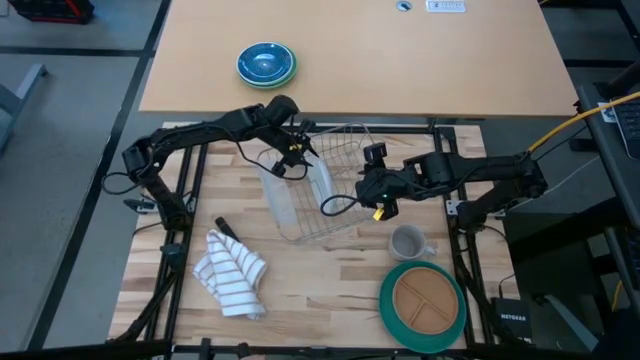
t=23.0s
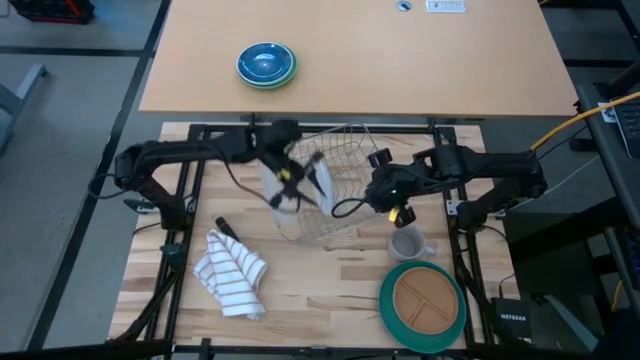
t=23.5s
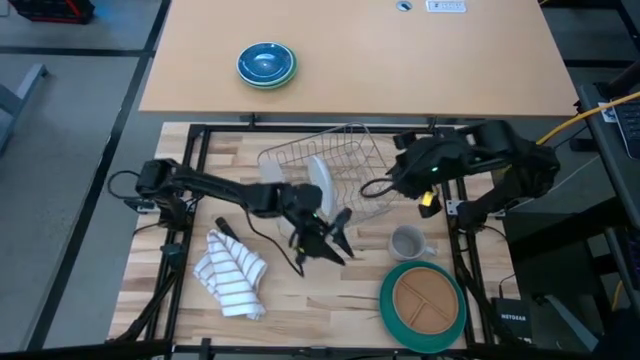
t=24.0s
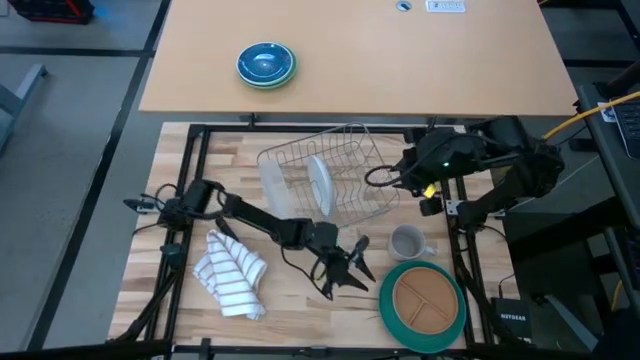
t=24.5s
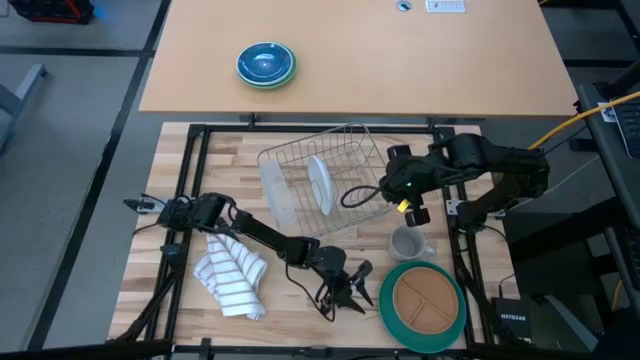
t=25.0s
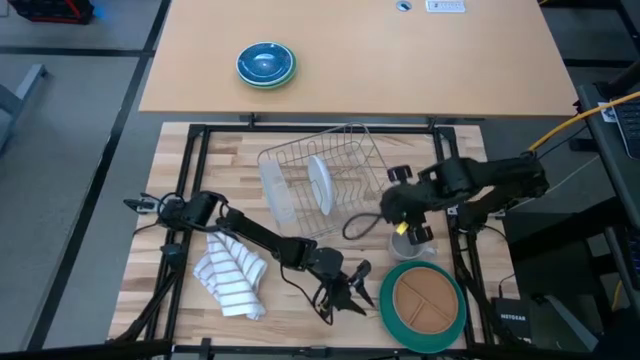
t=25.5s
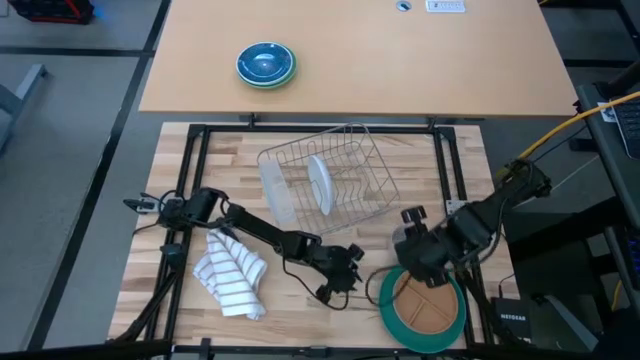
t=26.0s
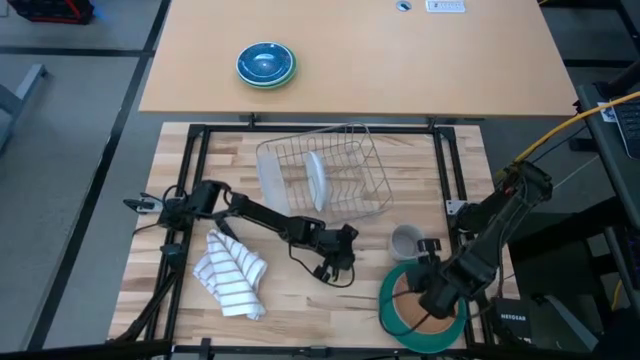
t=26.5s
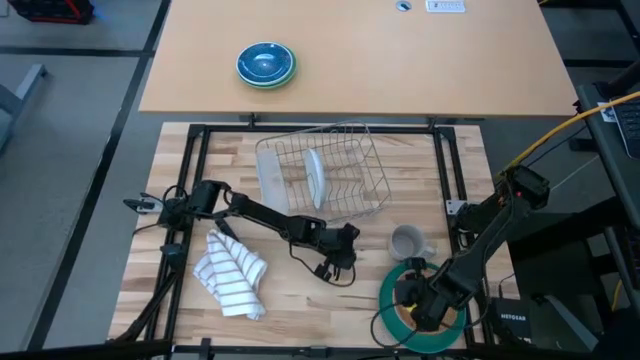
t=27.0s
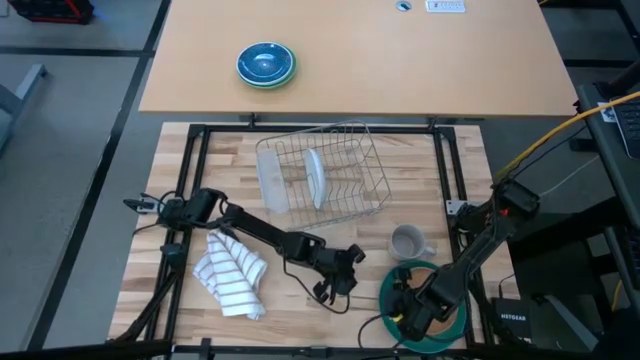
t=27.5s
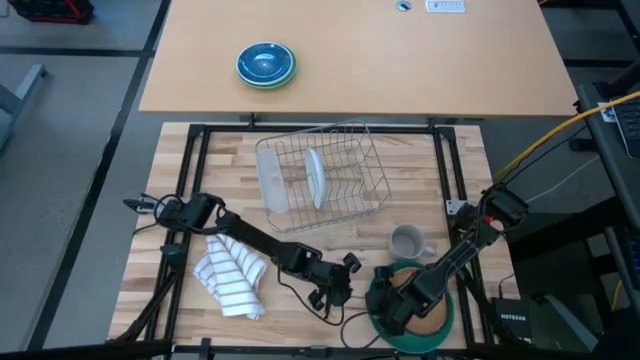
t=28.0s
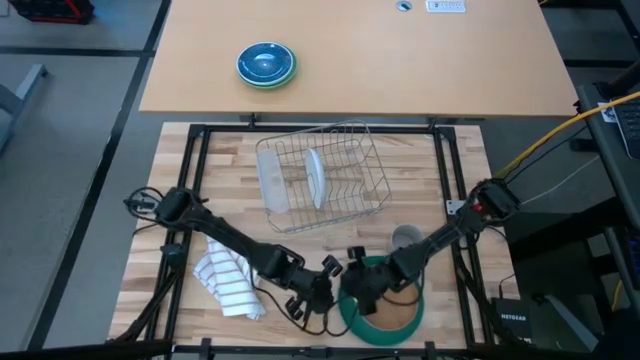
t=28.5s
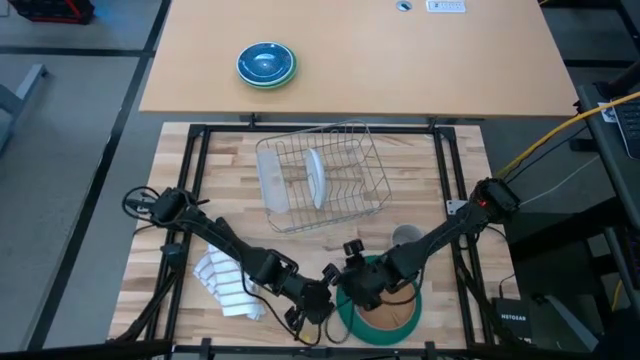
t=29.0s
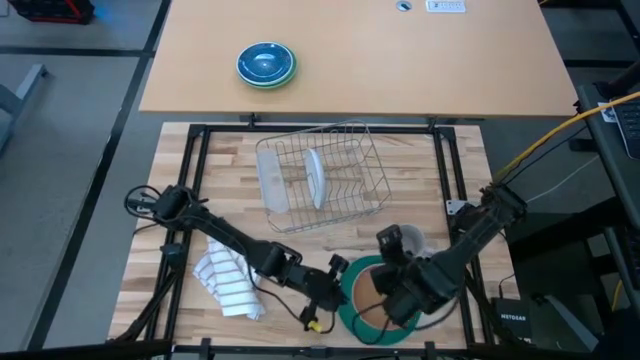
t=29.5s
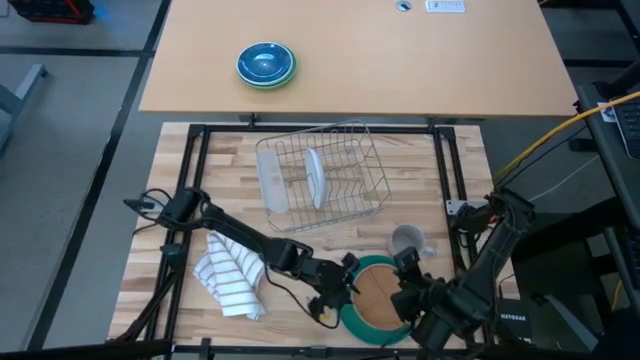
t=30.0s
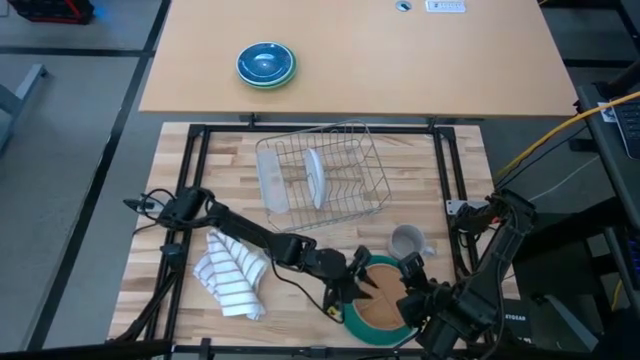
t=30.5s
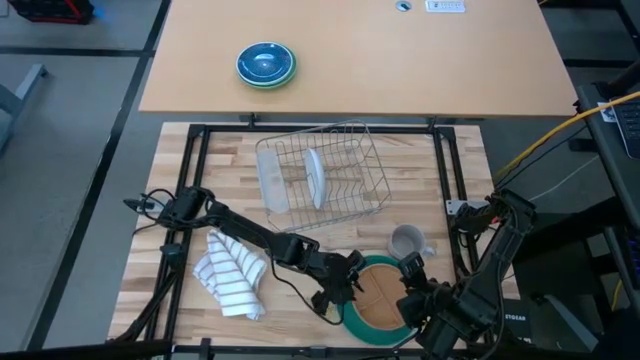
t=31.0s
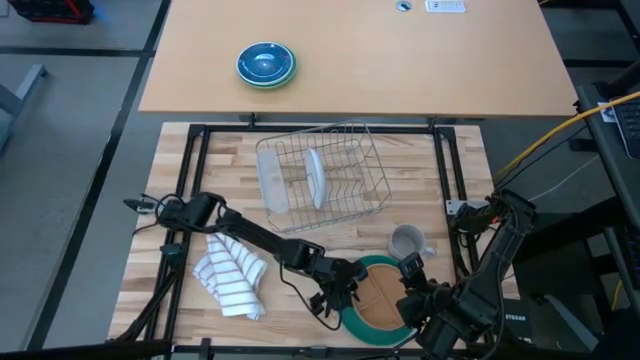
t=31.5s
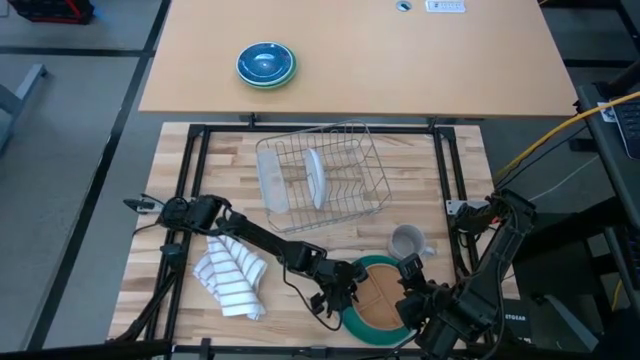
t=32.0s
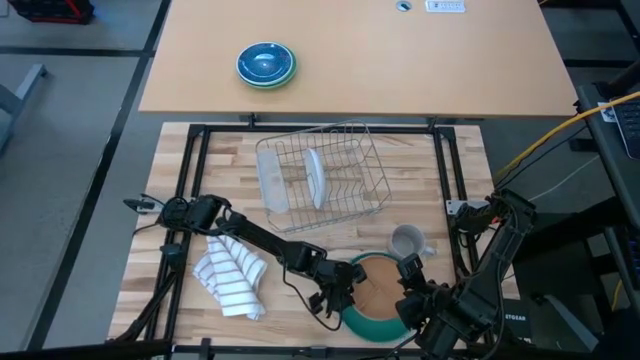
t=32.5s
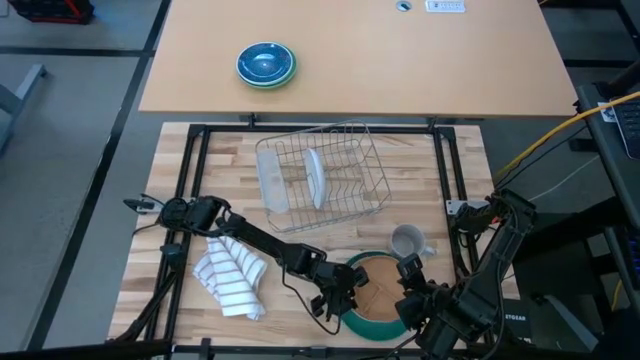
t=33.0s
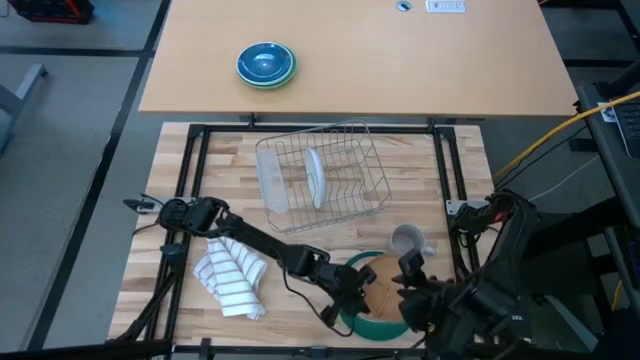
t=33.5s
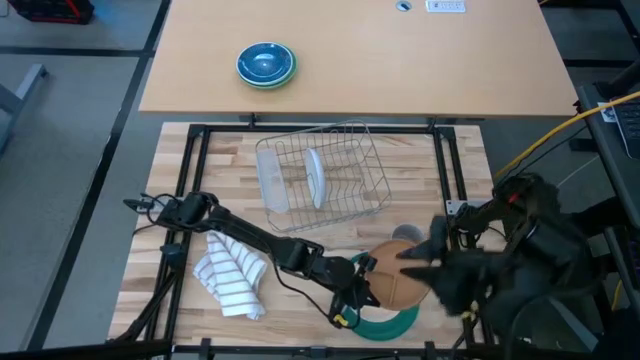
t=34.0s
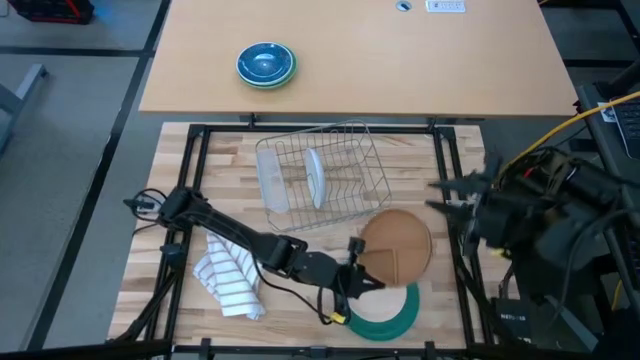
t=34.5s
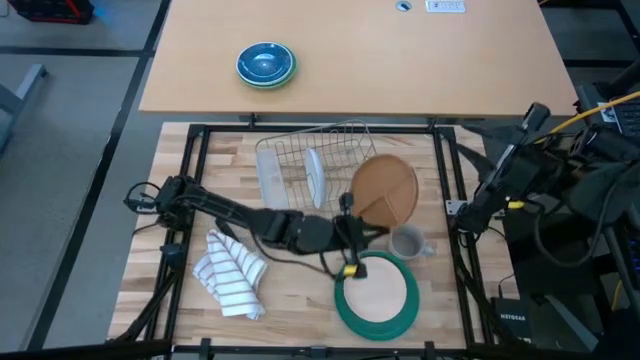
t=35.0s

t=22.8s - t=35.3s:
Task: Sort dishes
Put the brown plate in the dish rack
